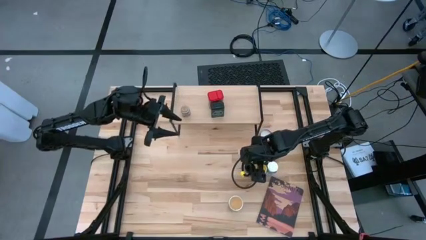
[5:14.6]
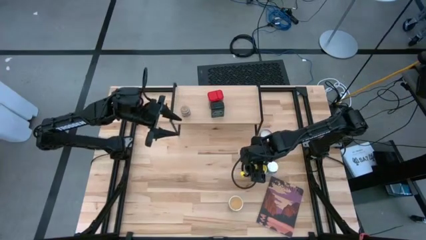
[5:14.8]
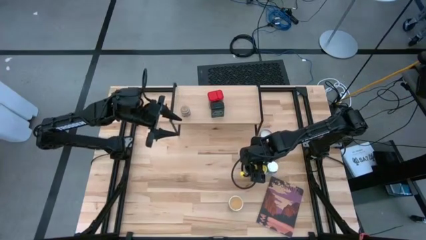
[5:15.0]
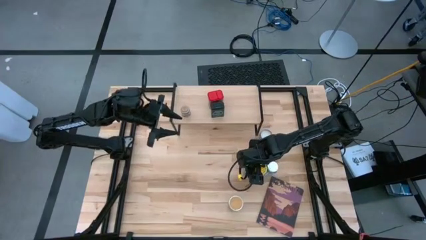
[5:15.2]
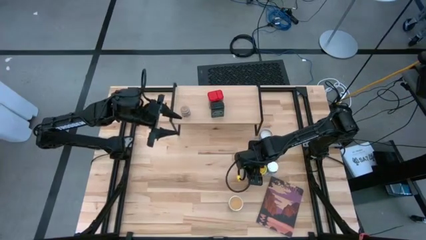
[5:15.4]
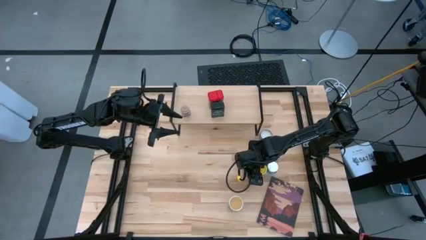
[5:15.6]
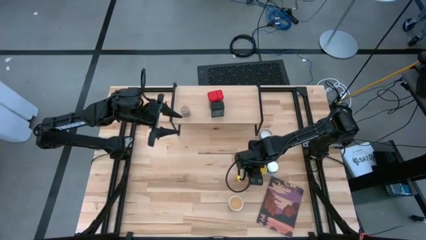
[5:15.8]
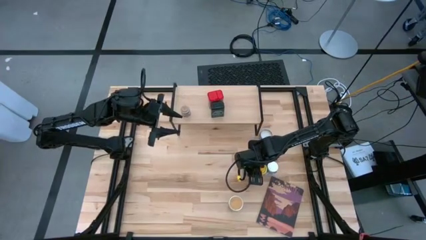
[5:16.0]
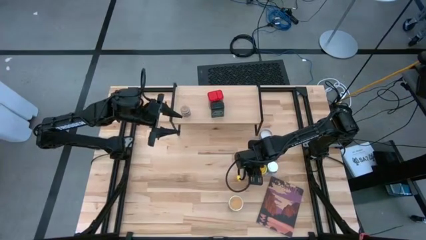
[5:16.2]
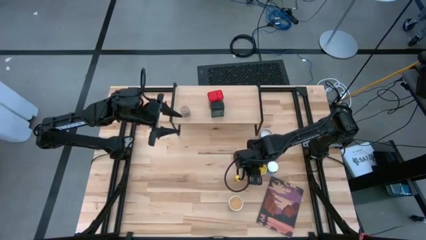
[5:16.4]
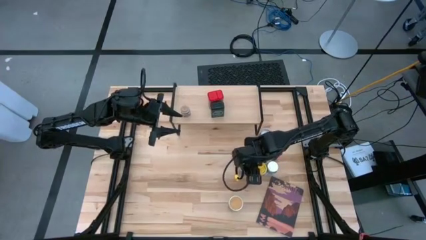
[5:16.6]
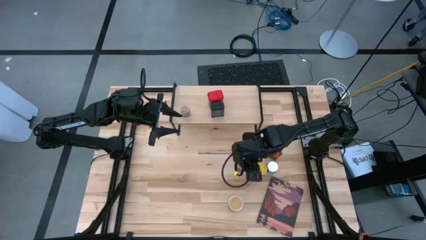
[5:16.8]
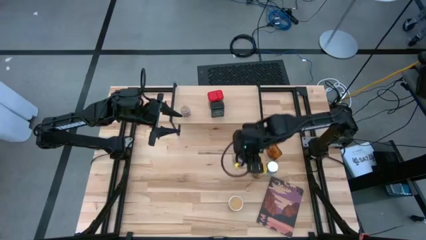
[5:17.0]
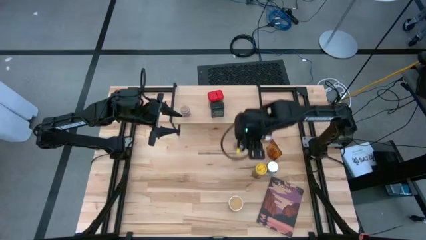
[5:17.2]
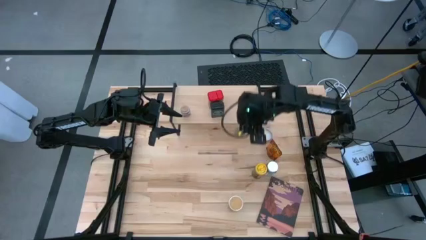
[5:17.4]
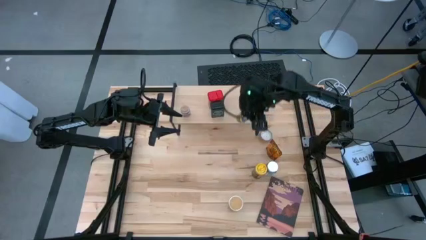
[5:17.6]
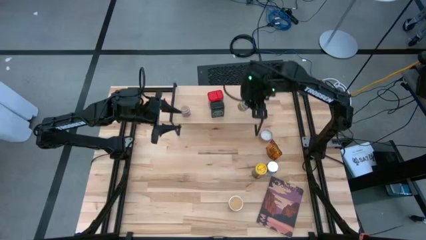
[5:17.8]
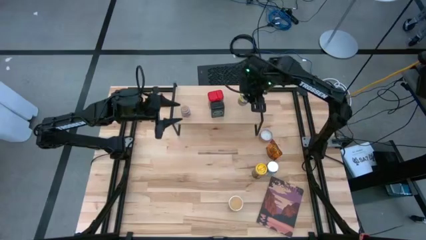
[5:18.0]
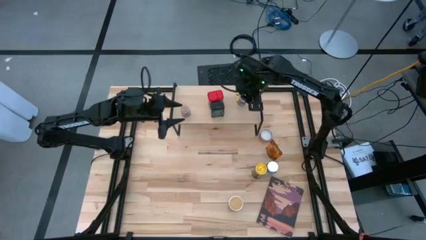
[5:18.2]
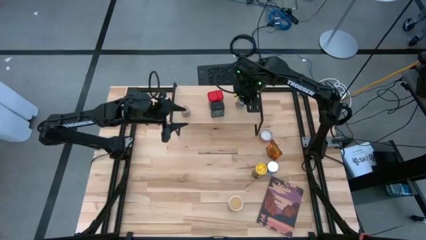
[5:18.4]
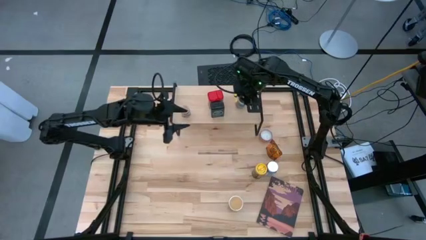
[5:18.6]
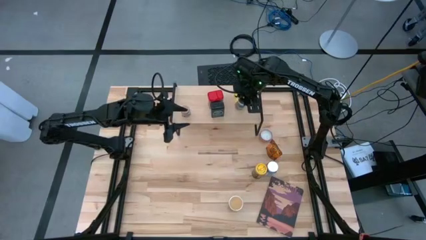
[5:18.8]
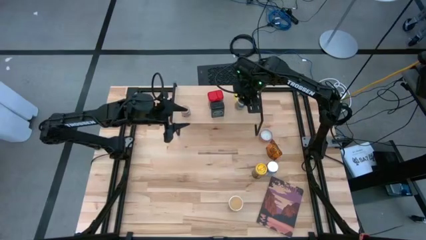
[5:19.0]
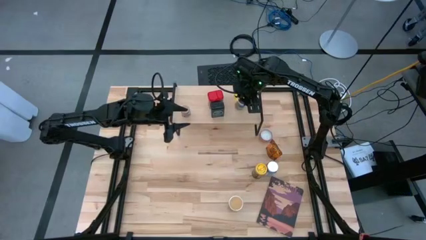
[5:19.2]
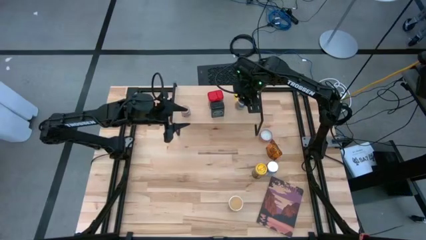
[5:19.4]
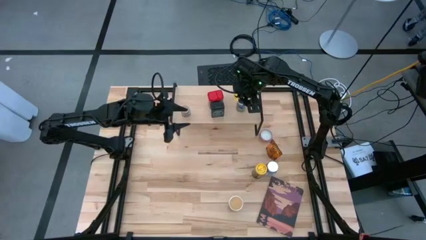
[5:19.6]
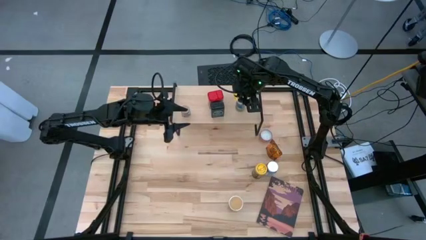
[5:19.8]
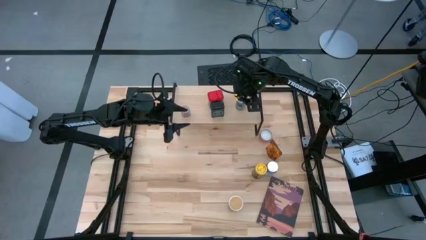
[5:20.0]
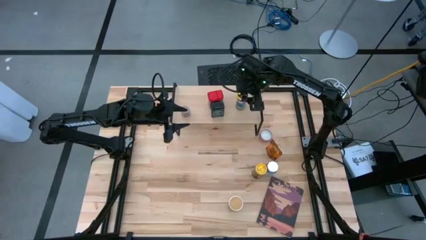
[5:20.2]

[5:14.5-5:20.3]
Task: Shelf spices
Put the dark yellow spice bottle on the shelf

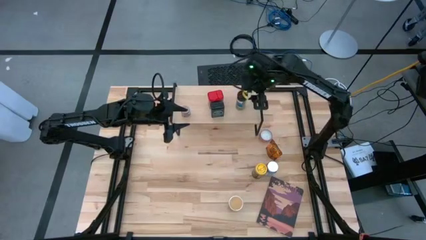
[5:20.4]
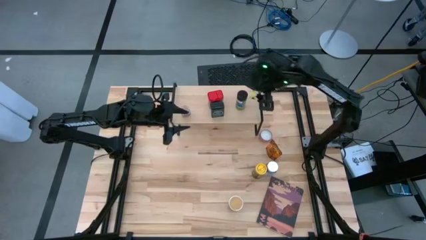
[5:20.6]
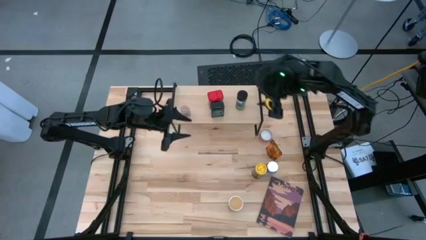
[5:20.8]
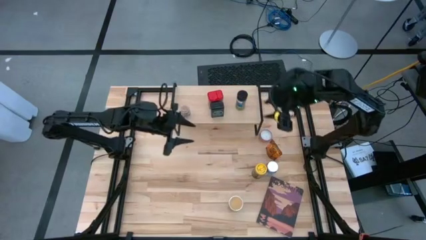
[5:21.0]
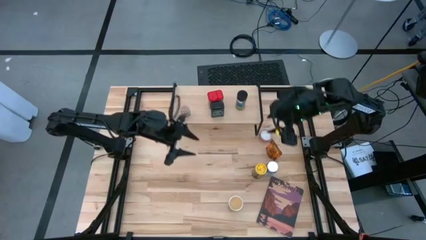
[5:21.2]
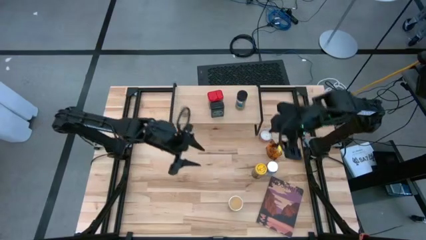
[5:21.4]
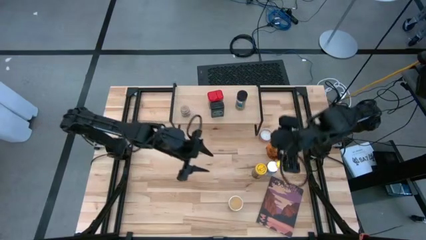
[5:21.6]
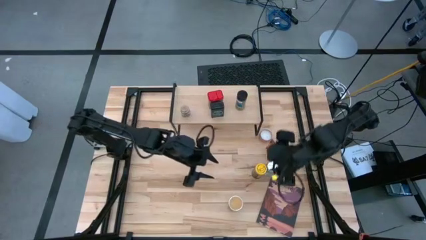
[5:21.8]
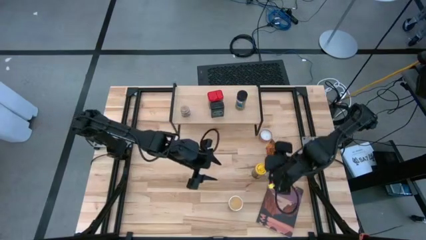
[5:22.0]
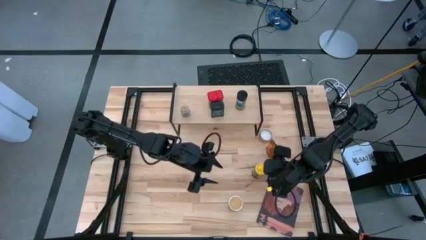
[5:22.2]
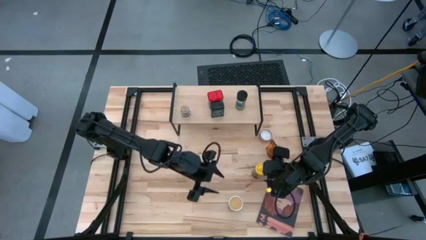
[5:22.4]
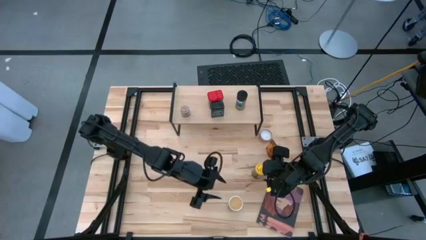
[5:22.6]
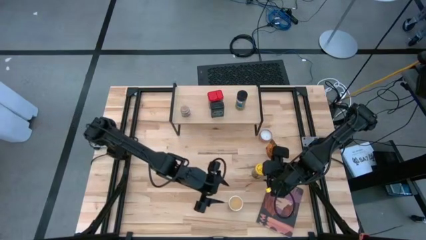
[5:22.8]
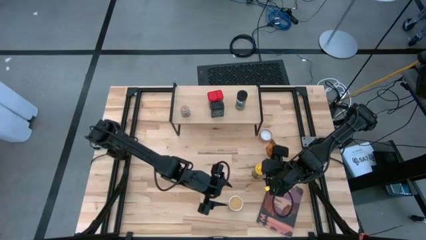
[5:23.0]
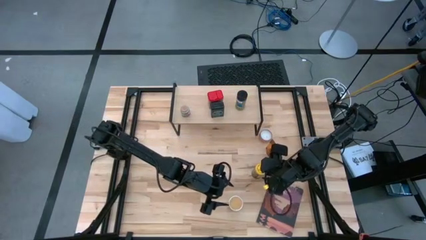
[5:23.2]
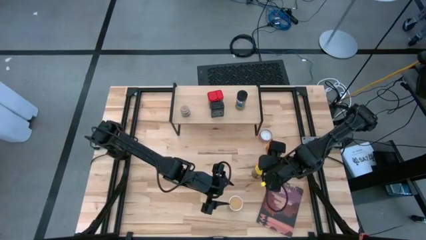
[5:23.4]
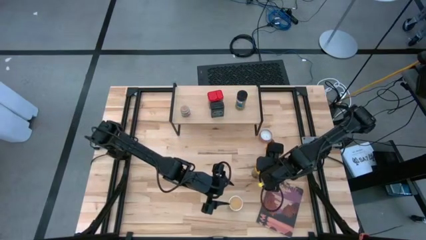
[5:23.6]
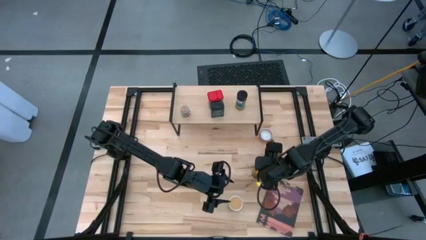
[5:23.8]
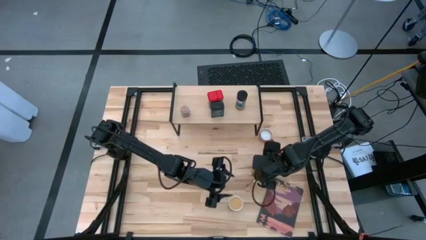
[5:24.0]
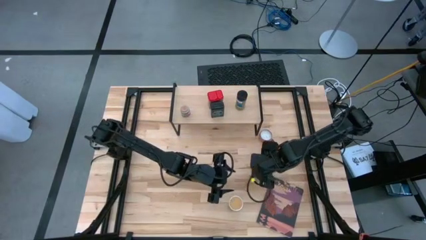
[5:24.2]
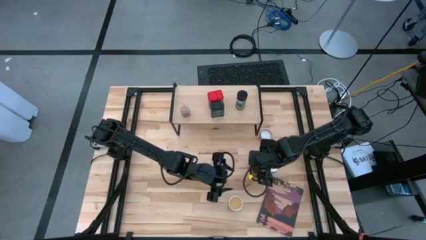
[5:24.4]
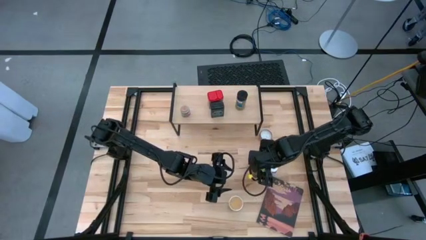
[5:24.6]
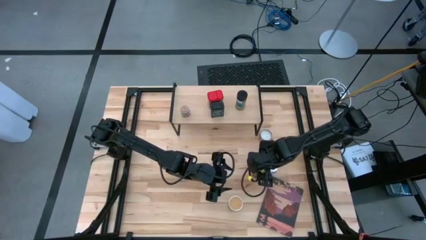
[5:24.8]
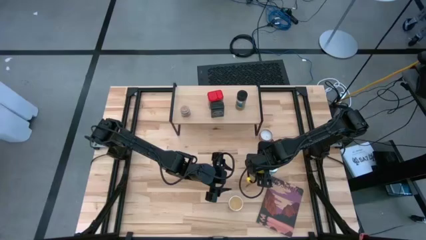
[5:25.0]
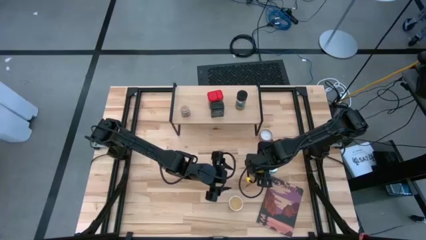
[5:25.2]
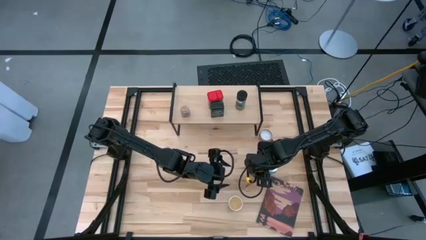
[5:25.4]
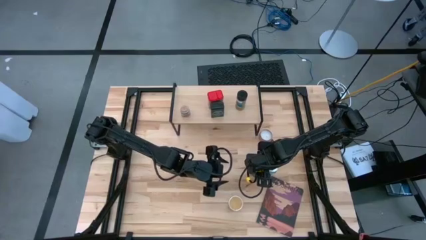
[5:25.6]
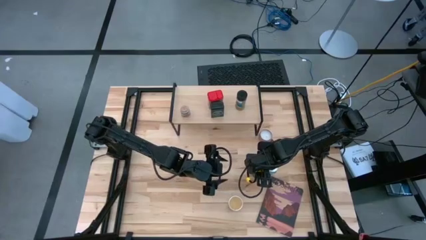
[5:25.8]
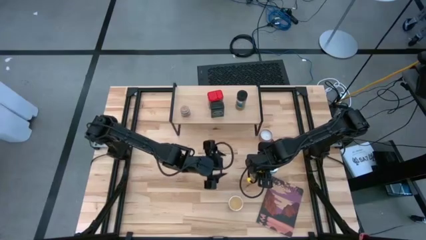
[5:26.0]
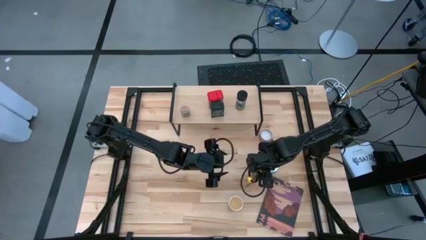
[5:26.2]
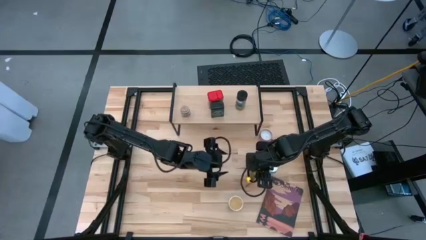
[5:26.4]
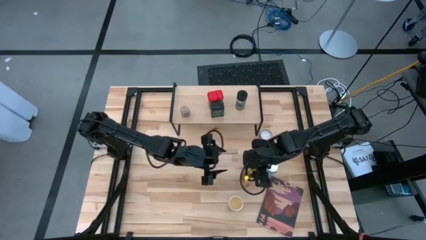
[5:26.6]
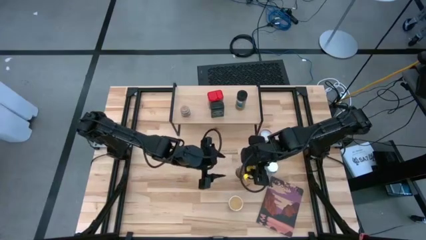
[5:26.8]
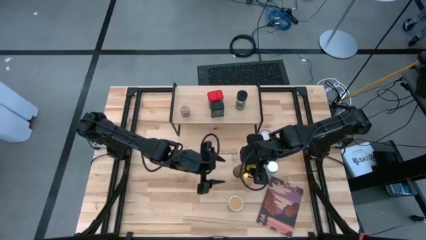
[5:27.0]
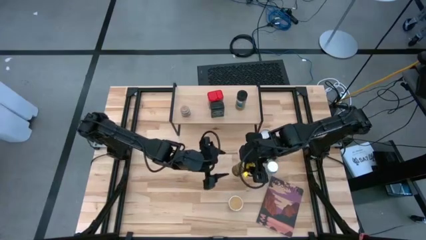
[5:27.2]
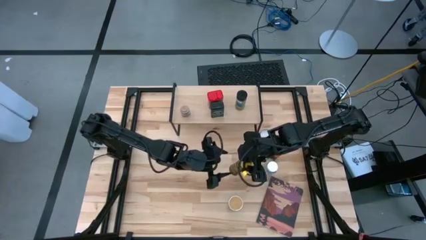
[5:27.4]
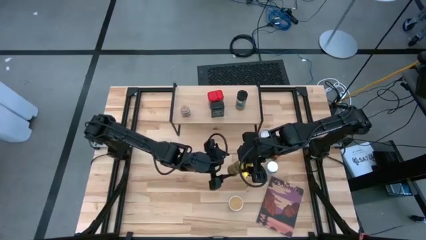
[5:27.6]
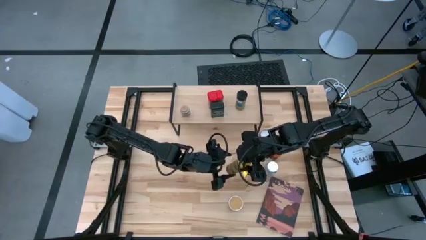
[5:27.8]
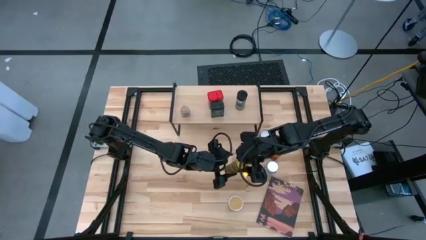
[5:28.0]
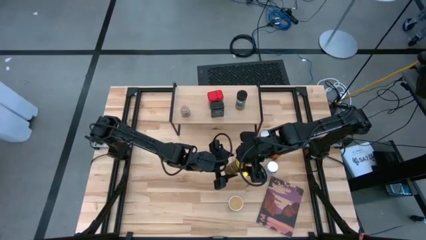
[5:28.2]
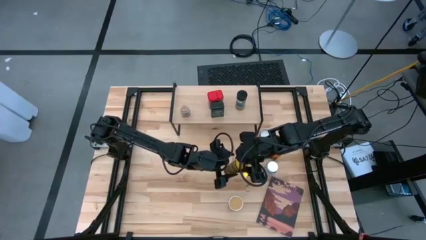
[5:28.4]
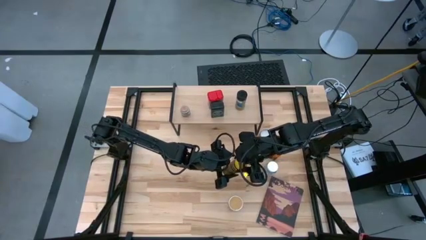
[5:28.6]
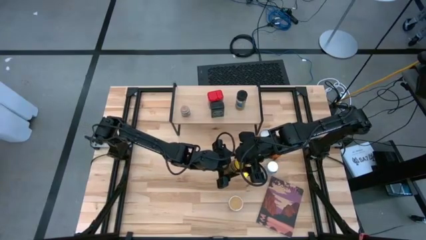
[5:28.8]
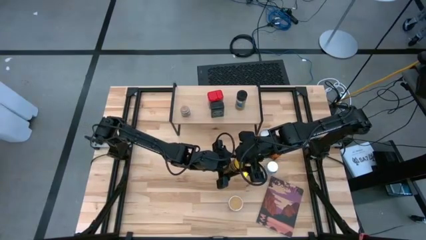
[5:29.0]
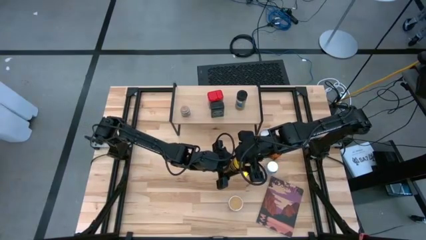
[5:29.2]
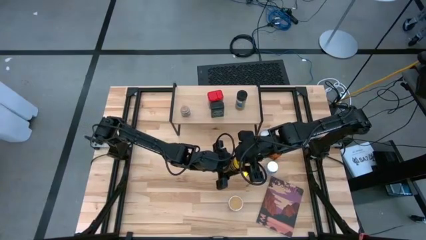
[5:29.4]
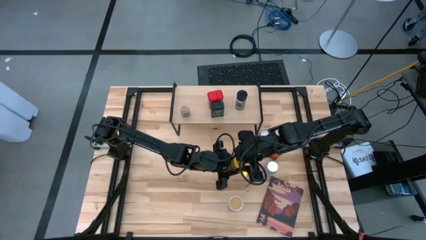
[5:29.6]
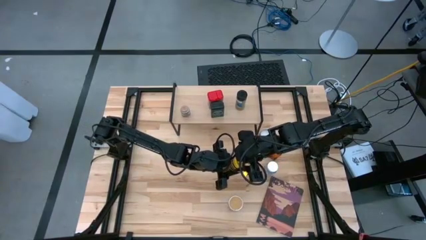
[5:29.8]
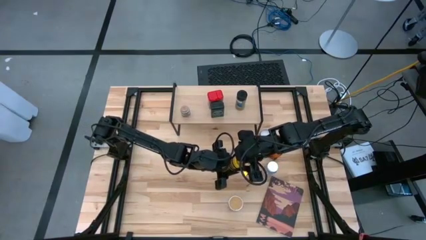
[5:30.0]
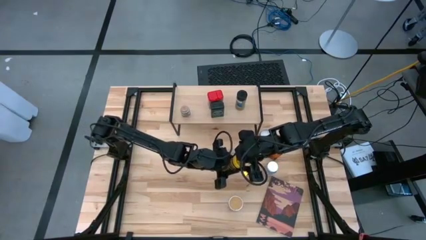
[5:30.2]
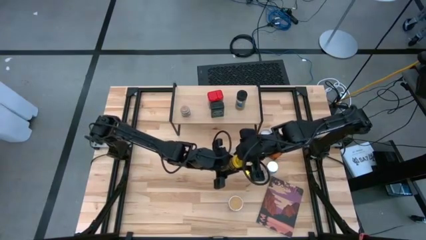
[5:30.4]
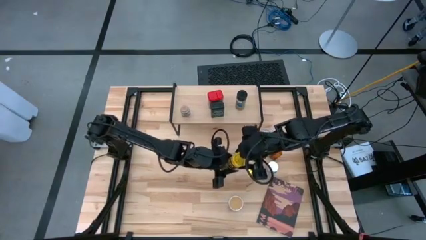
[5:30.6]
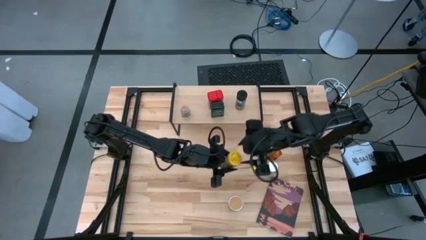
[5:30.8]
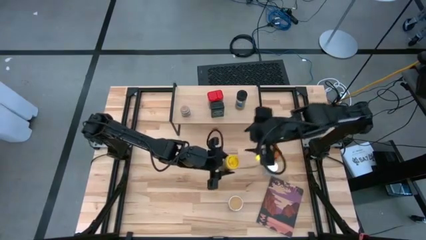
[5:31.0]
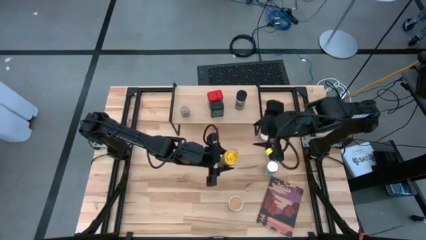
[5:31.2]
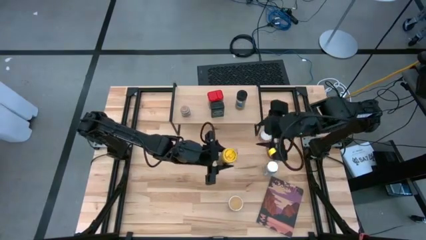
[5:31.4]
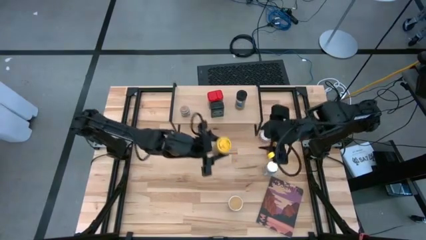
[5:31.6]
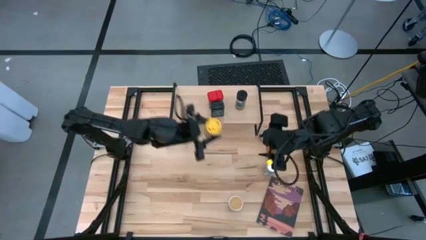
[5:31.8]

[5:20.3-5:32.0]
Put the yellow spice bottle on the shelf
